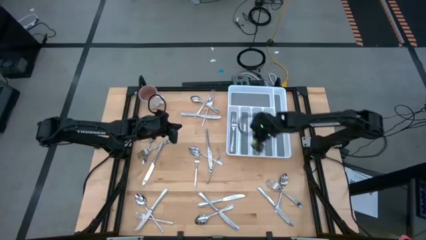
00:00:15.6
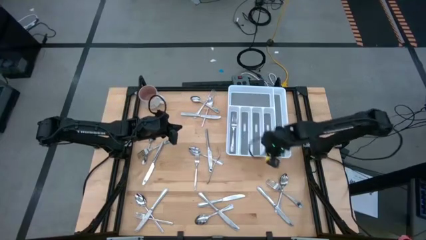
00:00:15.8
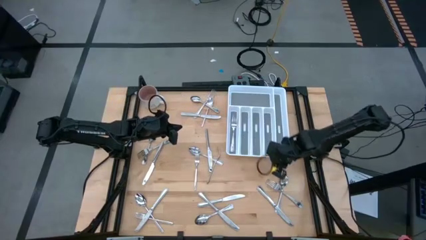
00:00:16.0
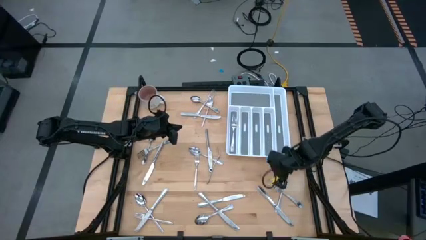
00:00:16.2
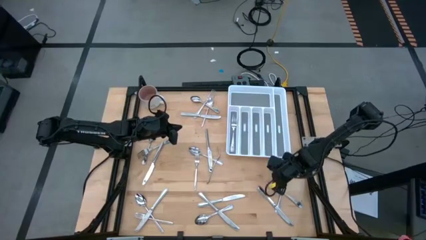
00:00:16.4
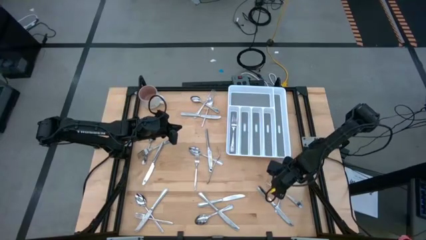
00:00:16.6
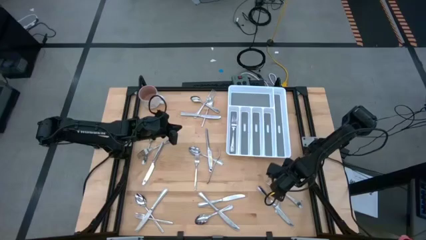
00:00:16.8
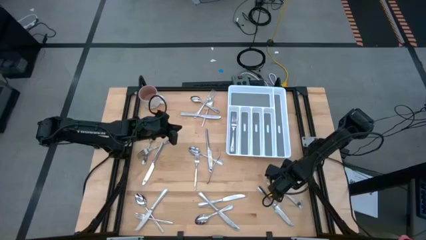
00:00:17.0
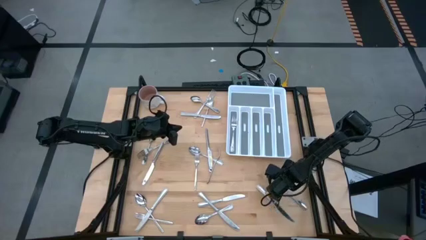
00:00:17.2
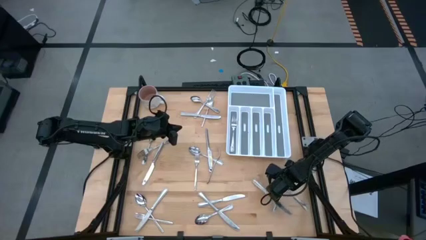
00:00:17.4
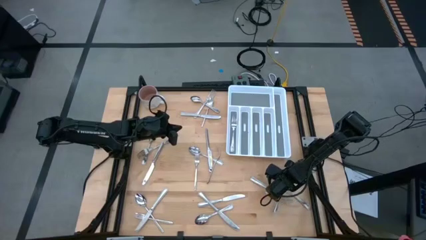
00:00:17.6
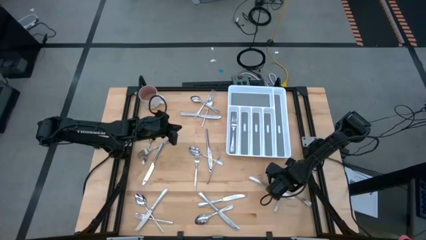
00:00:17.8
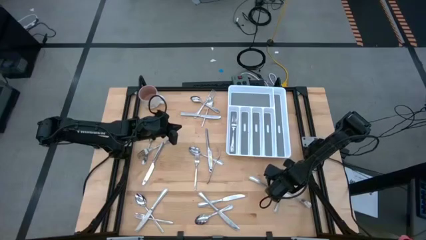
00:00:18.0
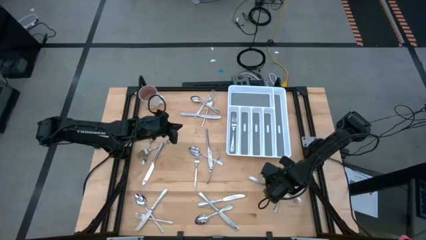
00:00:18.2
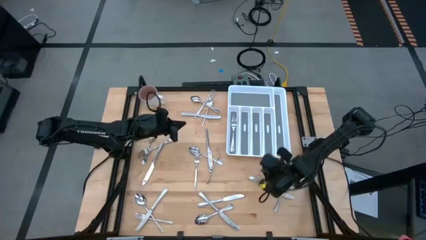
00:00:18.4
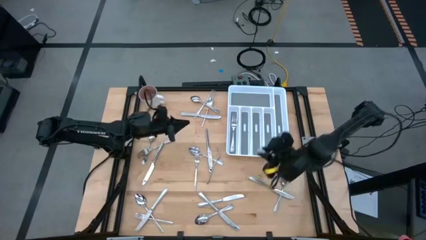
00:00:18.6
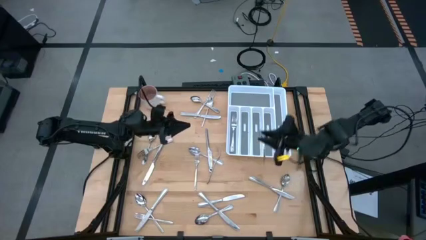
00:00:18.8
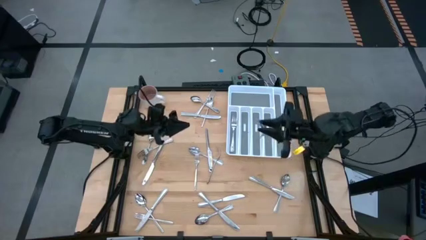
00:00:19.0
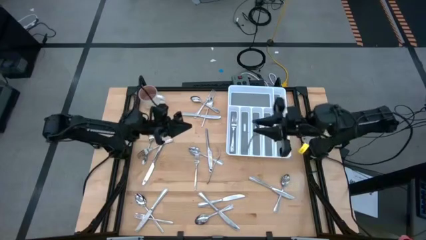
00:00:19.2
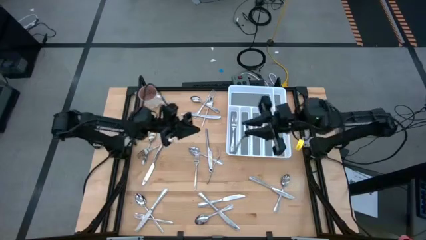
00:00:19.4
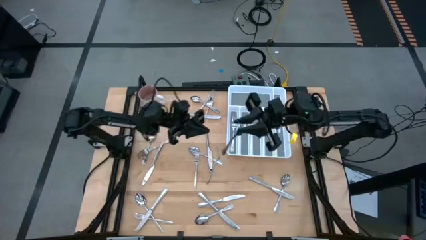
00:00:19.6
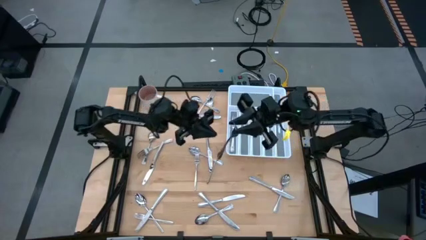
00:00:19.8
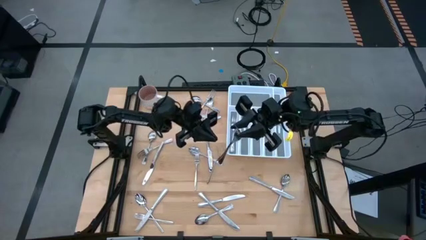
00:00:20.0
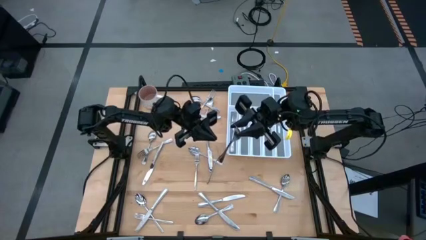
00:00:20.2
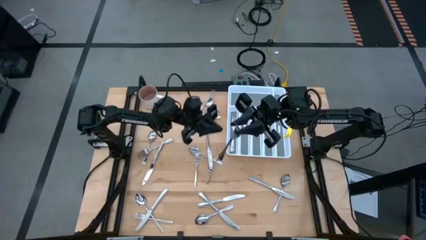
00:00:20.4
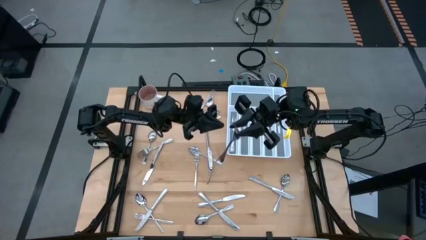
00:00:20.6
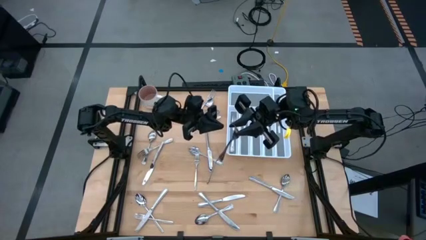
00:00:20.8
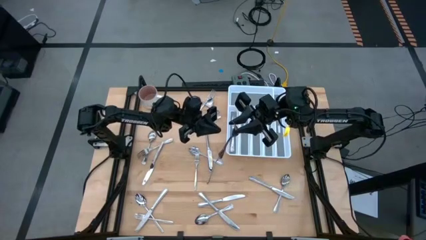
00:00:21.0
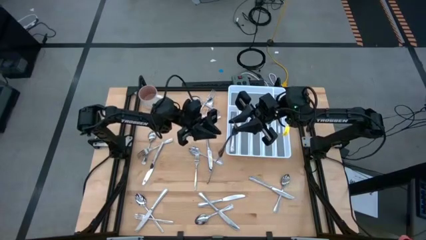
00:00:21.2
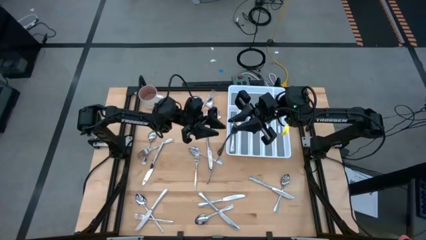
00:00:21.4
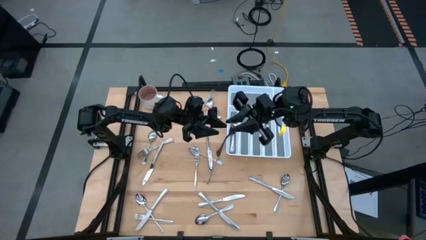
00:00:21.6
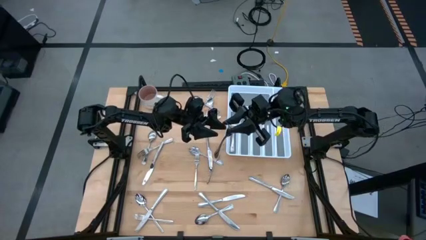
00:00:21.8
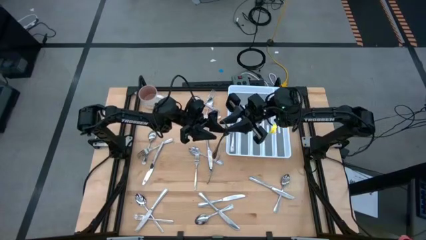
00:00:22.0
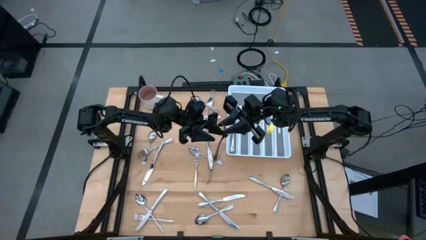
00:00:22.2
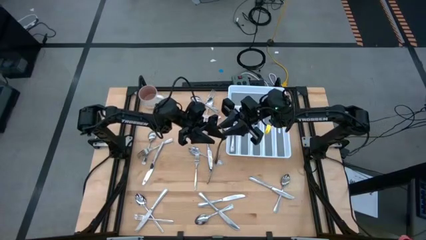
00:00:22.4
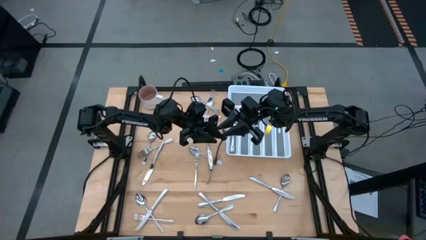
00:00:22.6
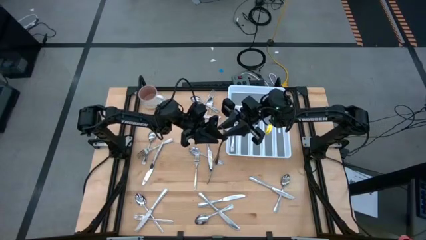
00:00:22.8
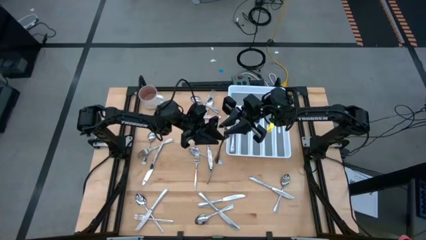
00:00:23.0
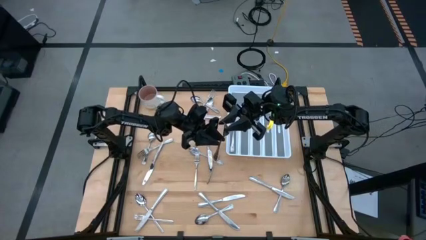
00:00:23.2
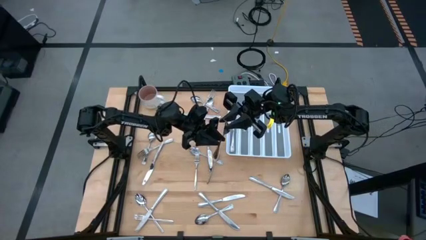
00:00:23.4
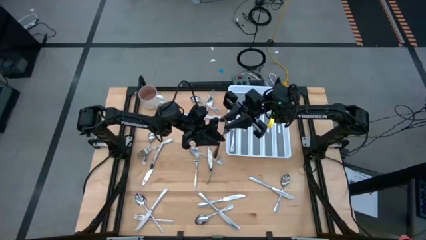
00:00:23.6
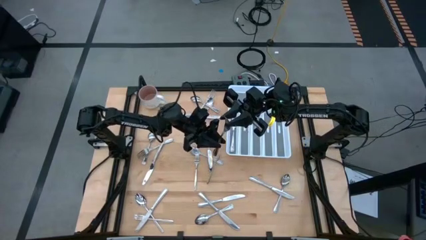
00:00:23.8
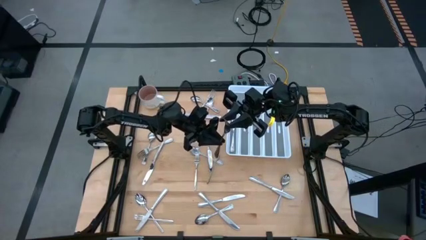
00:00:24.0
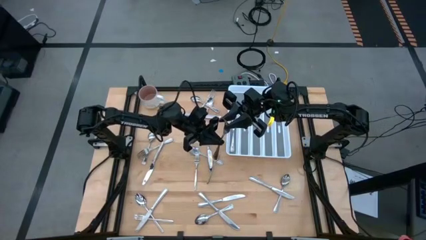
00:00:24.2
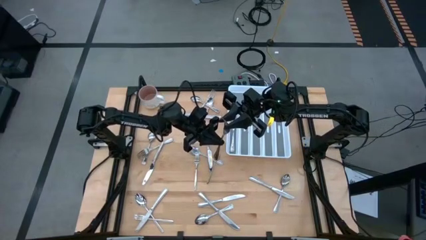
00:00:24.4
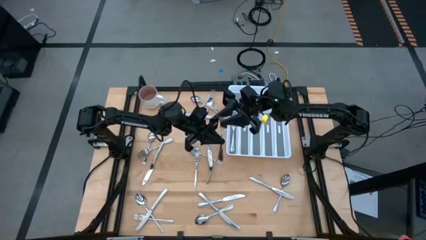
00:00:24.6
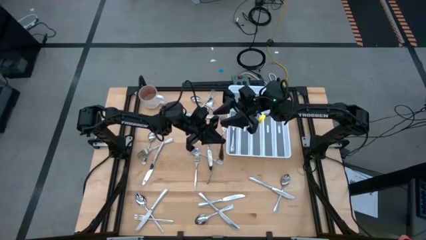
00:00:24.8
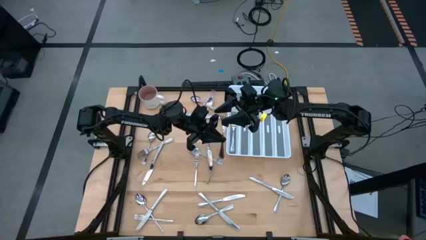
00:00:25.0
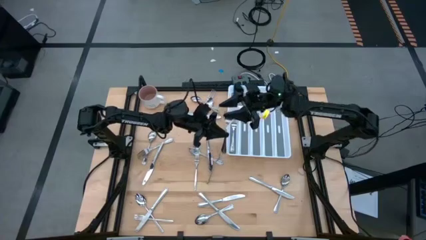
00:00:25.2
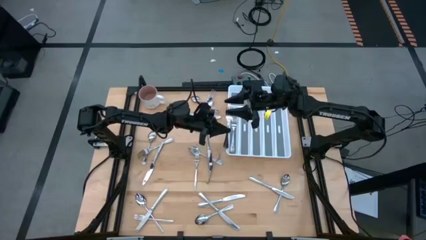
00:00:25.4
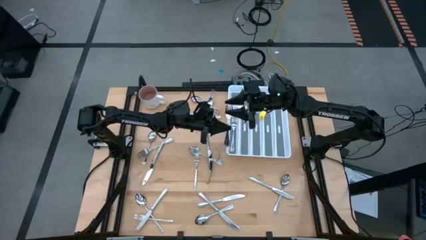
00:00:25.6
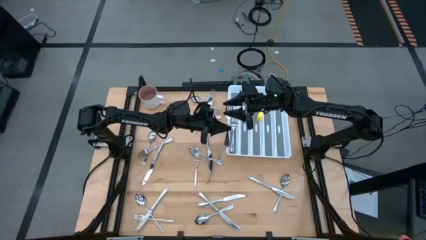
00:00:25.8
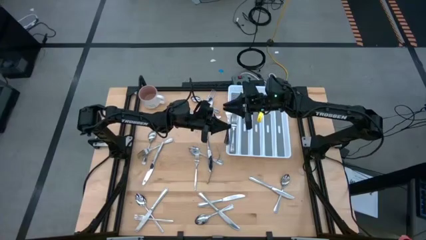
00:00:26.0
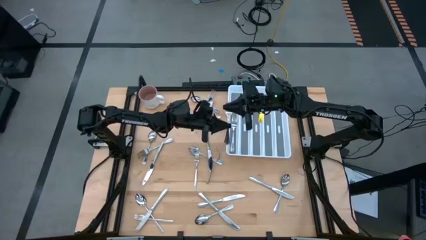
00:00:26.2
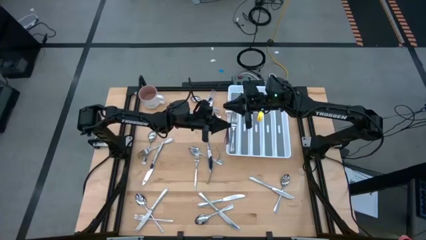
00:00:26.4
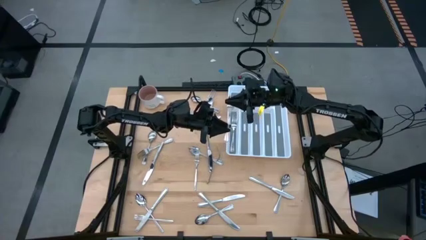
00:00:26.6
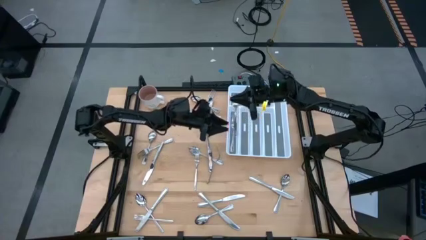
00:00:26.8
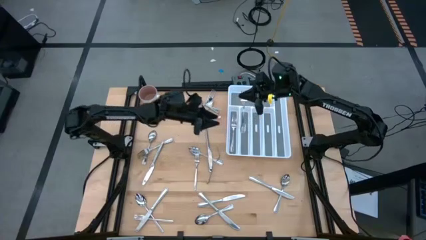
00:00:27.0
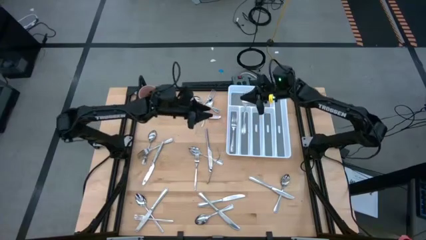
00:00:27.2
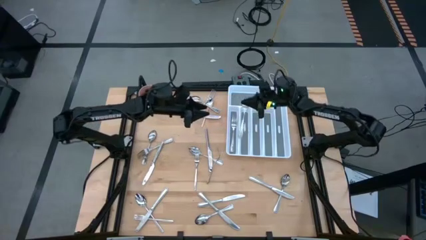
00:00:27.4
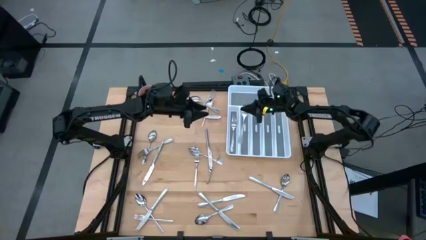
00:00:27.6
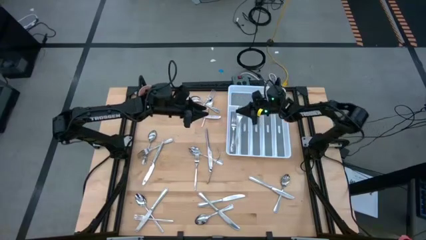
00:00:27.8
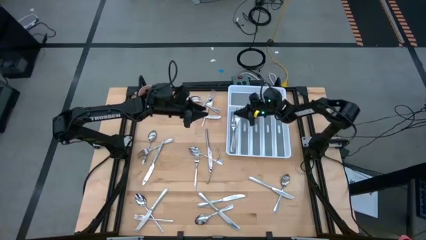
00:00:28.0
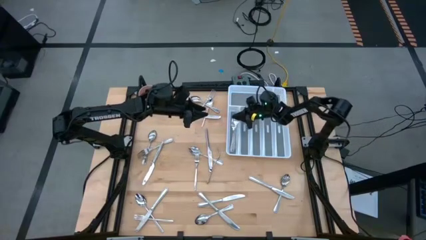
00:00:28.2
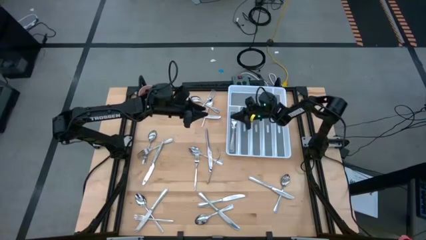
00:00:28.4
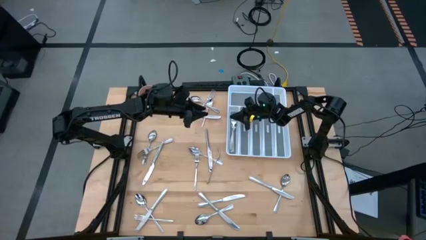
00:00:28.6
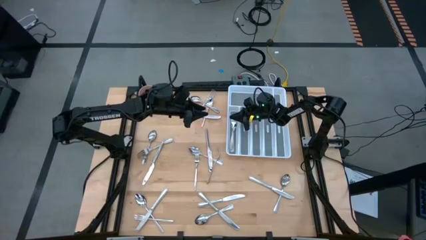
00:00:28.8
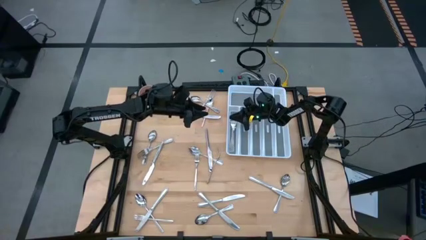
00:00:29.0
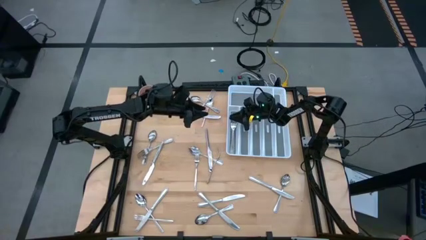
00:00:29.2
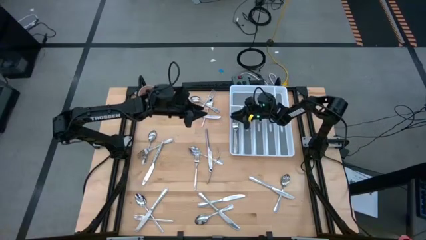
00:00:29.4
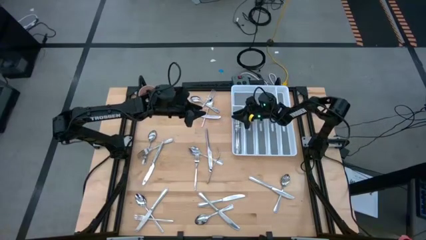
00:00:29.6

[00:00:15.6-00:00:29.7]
Task: Sort silverware
Put the silver fork into the left slot of the white silverware tray
